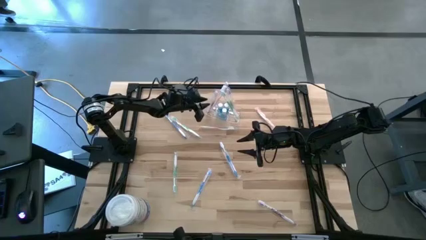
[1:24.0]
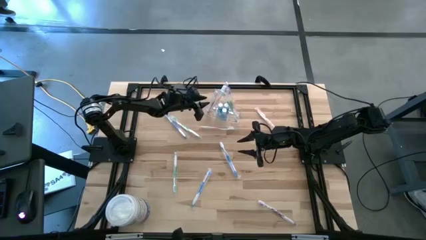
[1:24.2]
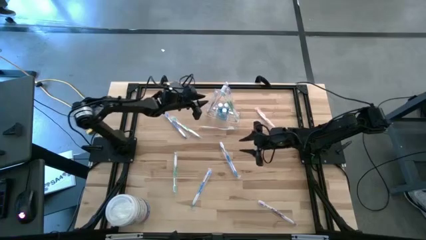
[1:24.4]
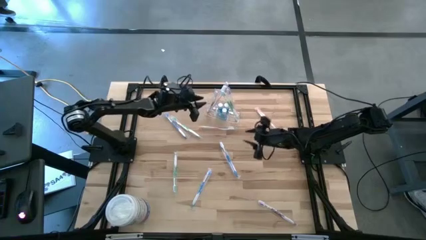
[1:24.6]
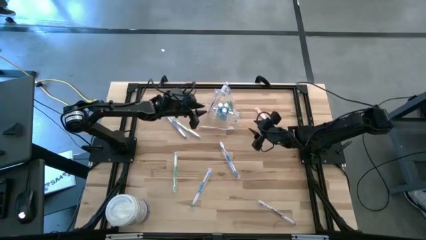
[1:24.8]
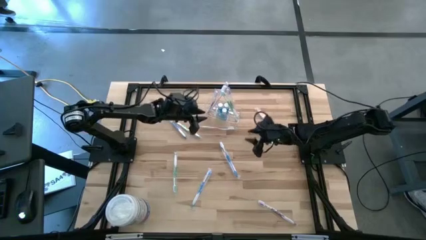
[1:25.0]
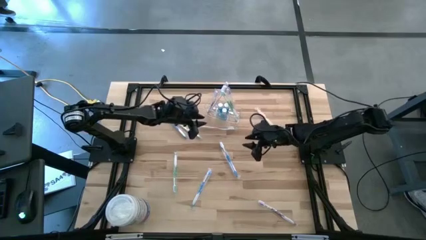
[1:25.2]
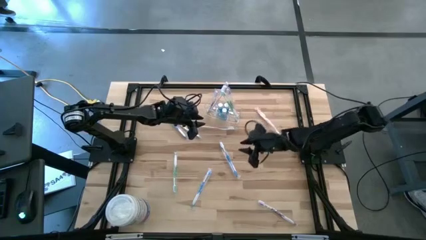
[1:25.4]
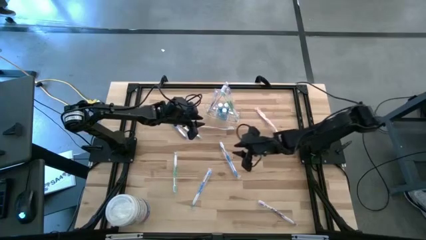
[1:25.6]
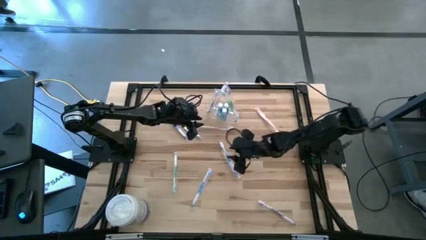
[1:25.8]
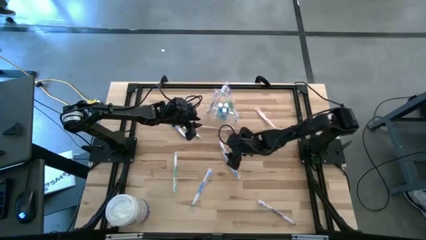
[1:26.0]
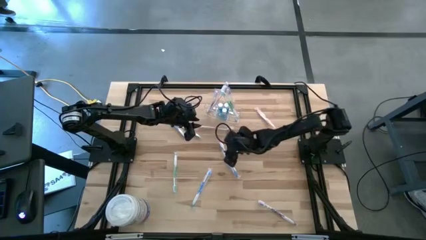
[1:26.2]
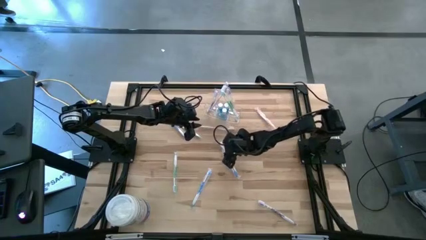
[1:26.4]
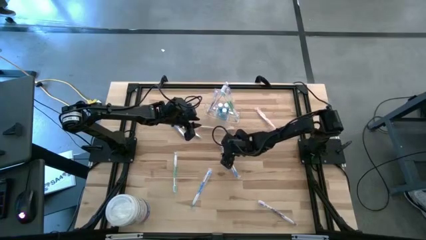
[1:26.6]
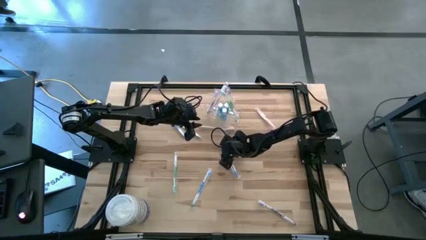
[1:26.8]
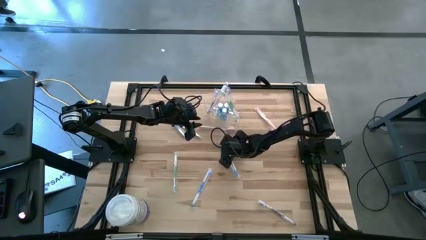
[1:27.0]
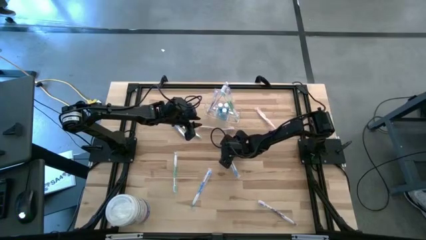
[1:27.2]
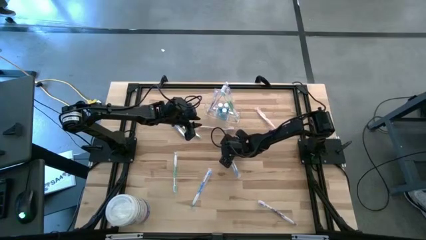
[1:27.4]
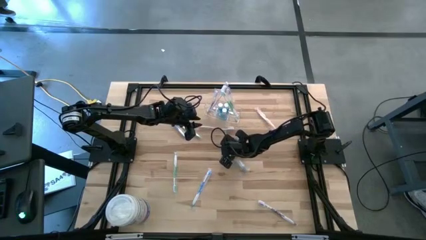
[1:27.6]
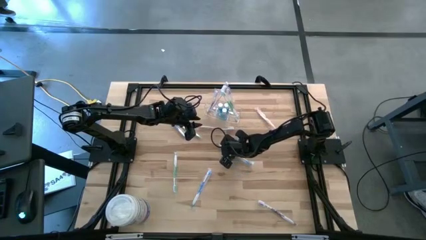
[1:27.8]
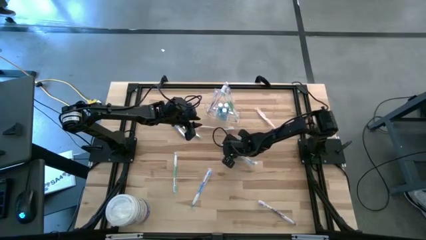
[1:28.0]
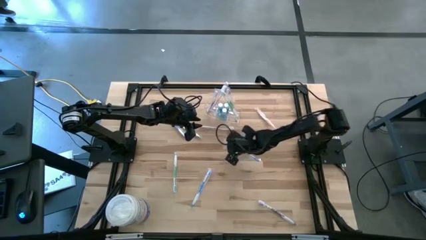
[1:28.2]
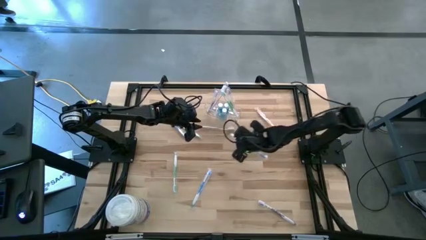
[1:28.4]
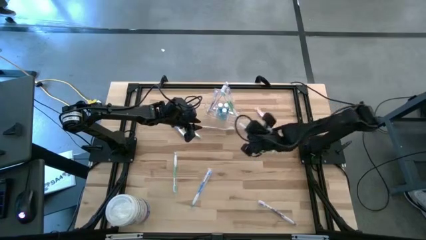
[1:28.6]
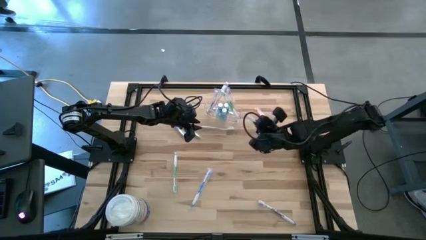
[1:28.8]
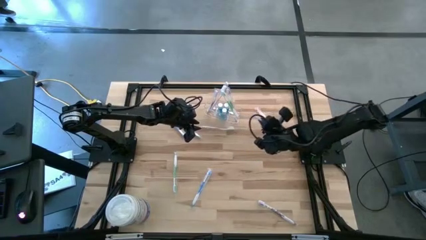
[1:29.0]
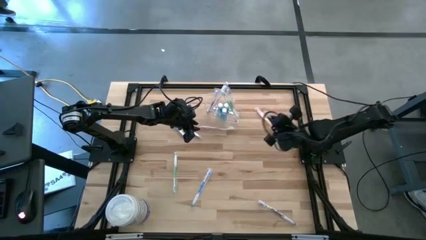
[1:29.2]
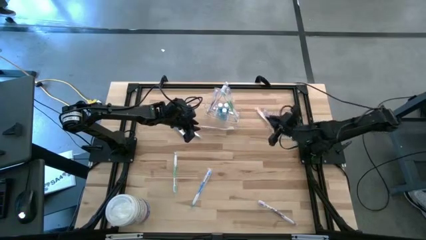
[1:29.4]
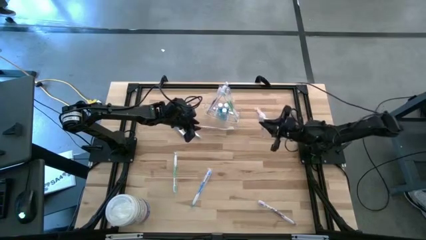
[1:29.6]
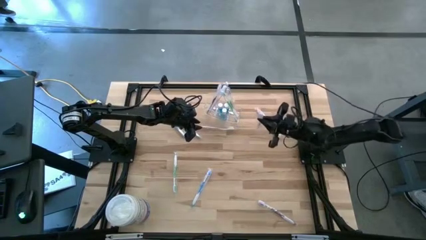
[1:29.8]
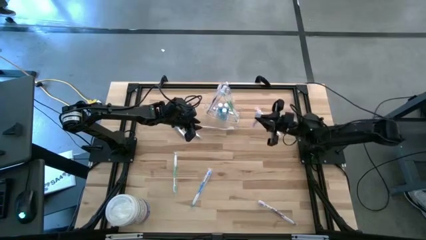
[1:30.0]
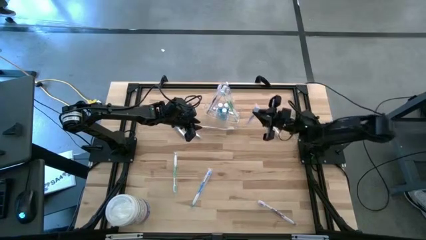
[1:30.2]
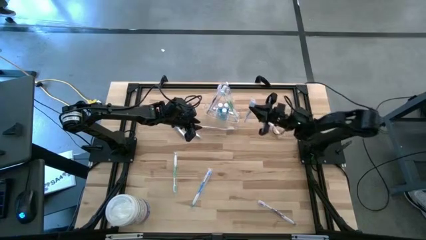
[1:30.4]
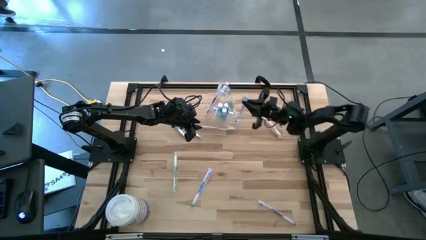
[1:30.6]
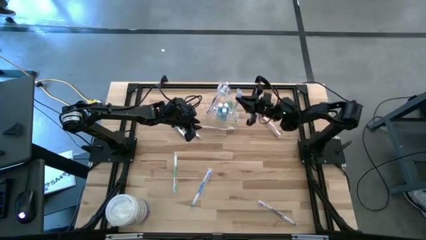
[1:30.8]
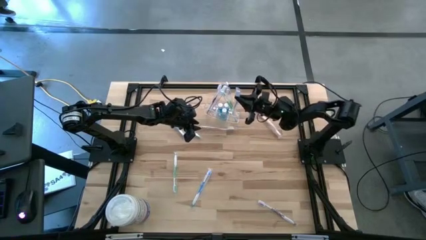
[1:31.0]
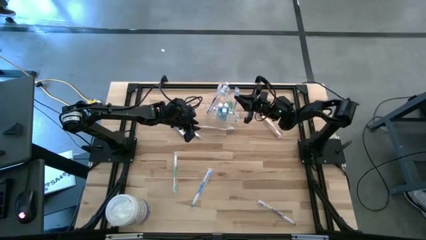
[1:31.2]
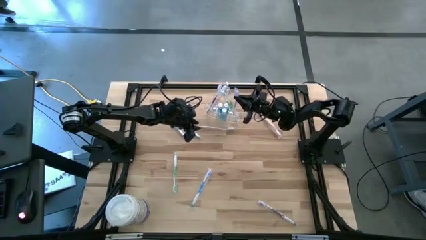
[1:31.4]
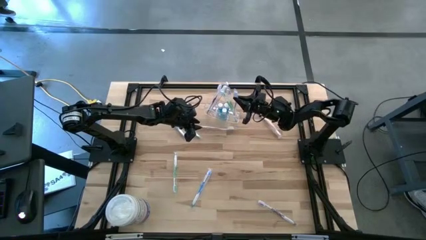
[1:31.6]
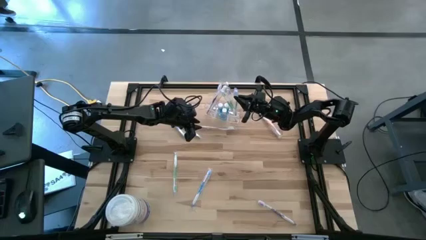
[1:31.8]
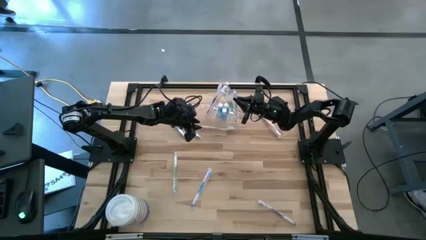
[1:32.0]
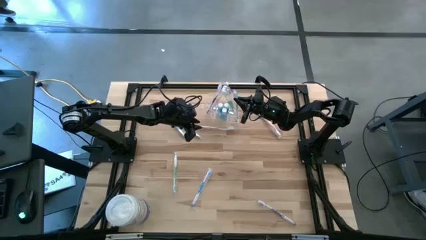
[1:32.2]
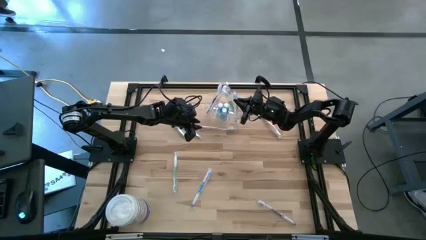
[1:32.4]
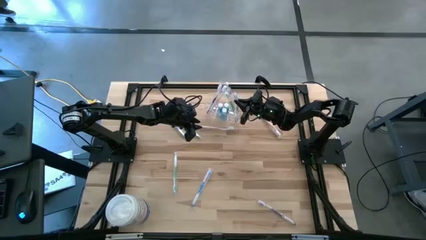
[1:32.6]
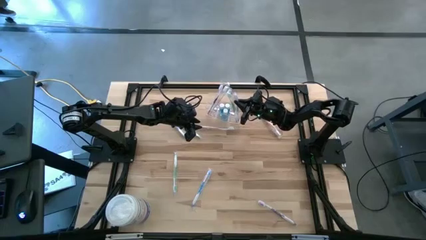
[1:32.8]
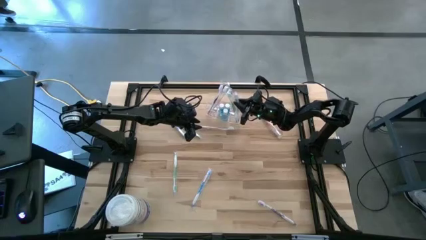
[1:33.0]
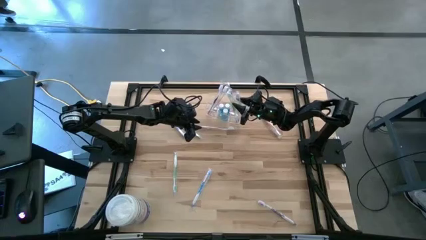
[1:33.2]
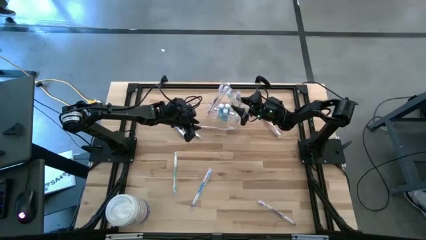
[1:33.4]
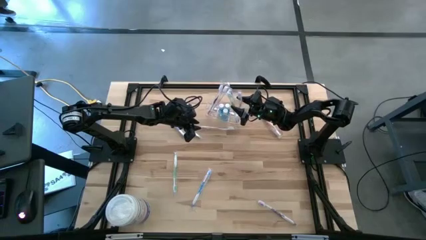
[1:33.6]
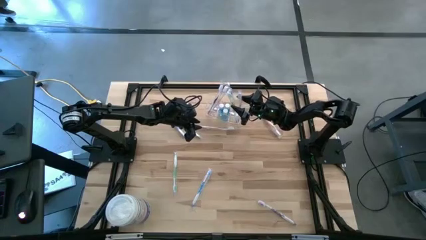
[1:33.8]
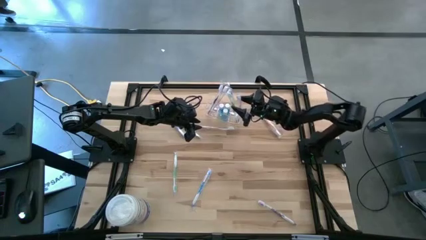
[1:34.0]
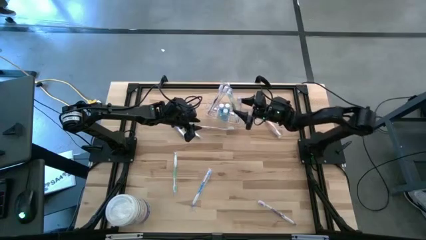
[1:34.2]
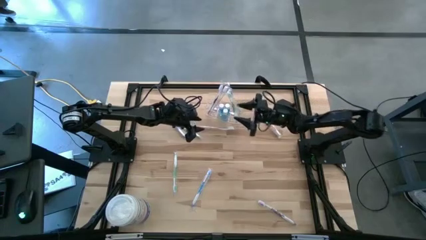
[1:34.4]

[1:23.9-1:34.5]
Task: Pick & Place toothbrushing station
Put the top blue toothbrush into the transparent organizer

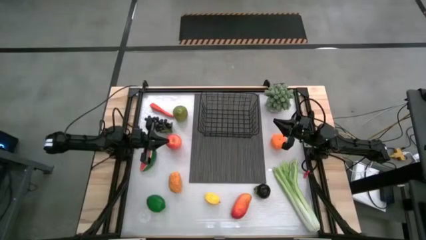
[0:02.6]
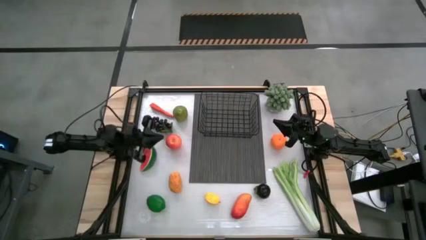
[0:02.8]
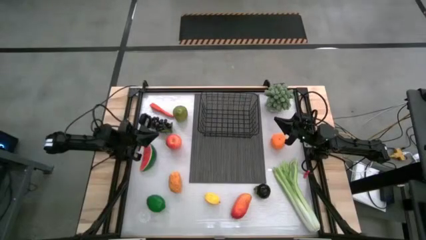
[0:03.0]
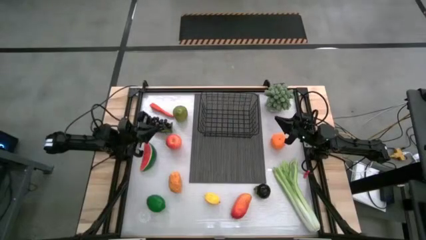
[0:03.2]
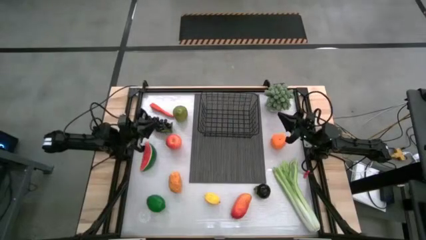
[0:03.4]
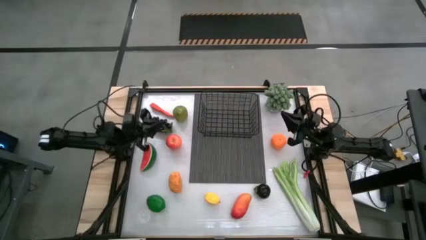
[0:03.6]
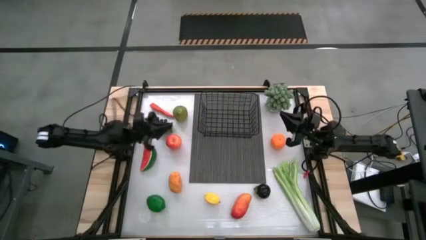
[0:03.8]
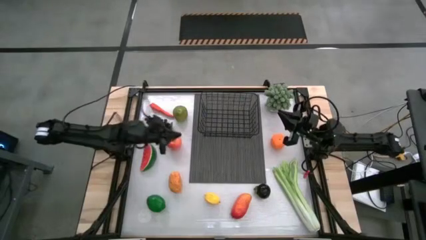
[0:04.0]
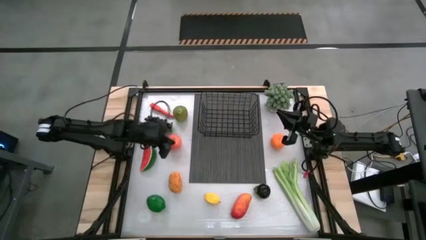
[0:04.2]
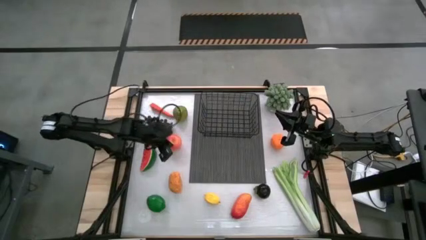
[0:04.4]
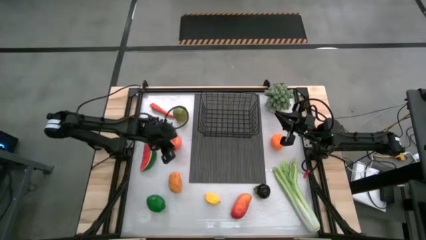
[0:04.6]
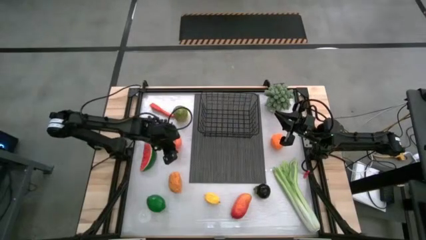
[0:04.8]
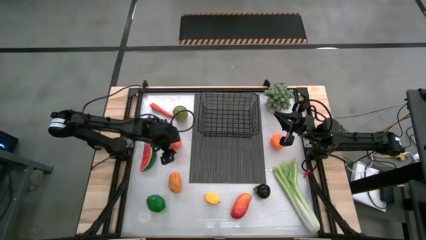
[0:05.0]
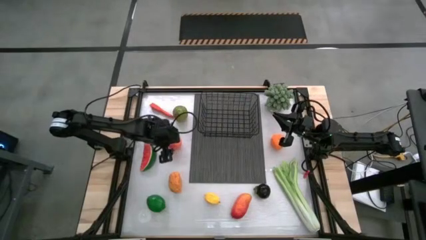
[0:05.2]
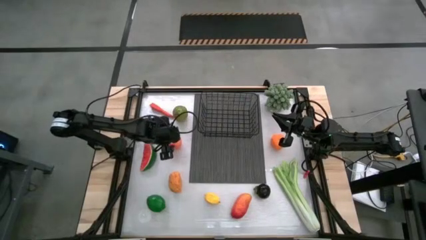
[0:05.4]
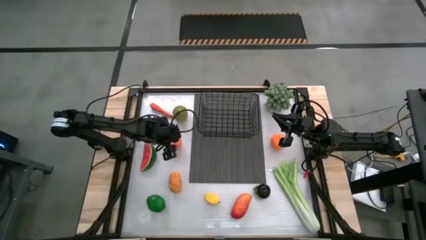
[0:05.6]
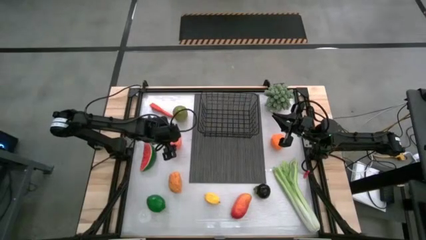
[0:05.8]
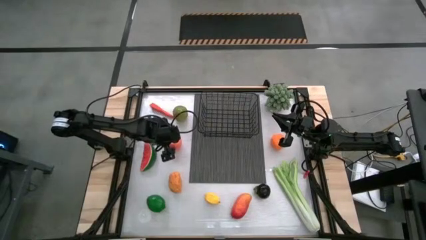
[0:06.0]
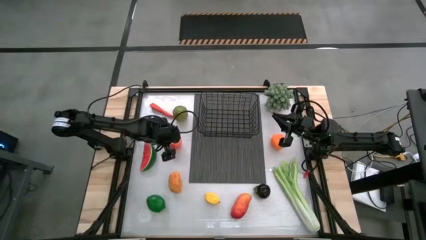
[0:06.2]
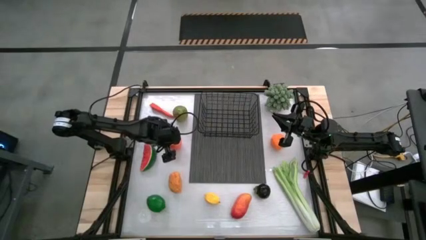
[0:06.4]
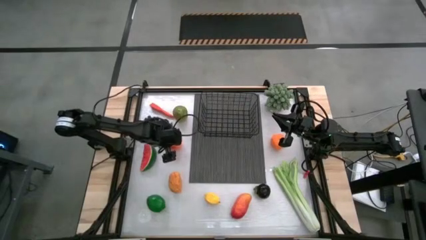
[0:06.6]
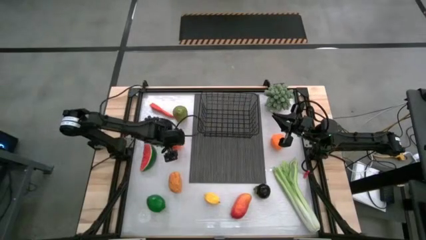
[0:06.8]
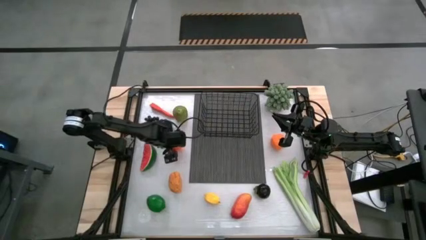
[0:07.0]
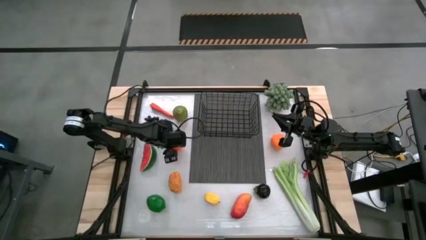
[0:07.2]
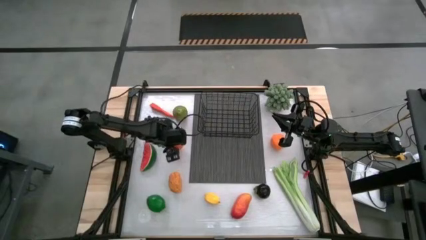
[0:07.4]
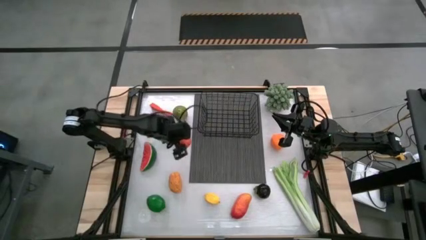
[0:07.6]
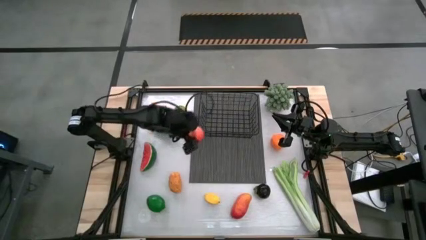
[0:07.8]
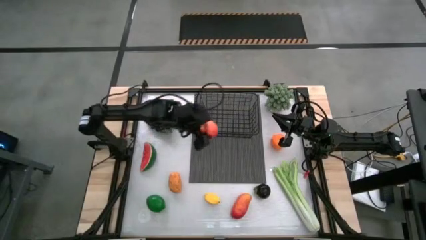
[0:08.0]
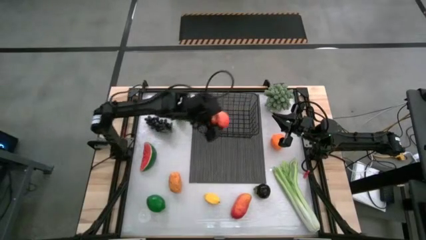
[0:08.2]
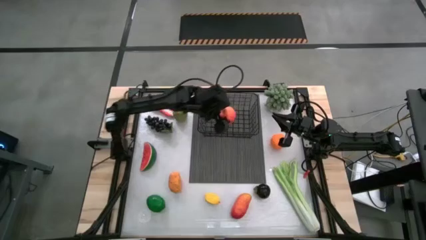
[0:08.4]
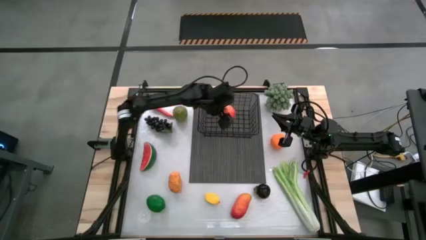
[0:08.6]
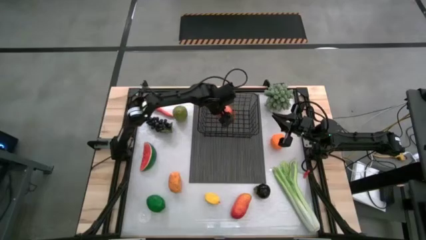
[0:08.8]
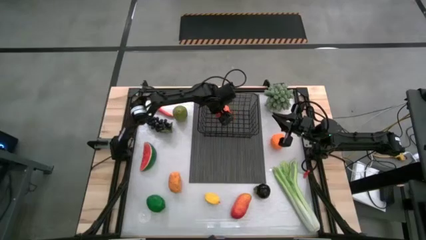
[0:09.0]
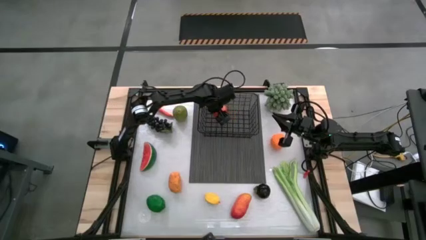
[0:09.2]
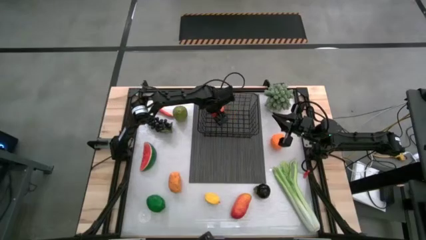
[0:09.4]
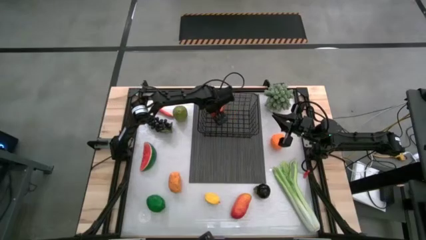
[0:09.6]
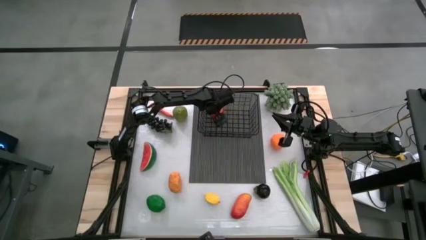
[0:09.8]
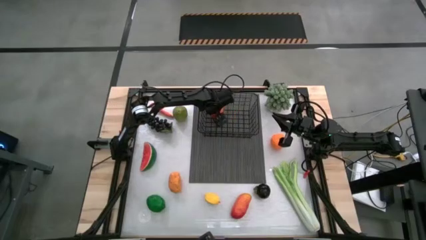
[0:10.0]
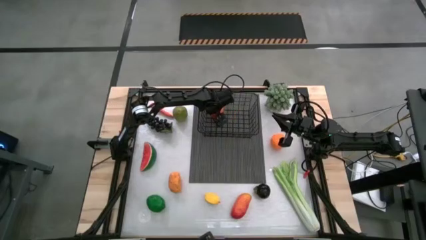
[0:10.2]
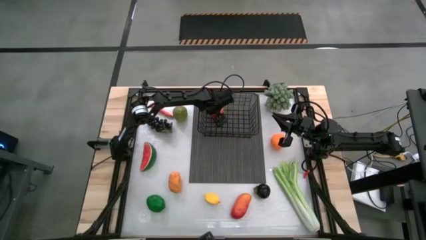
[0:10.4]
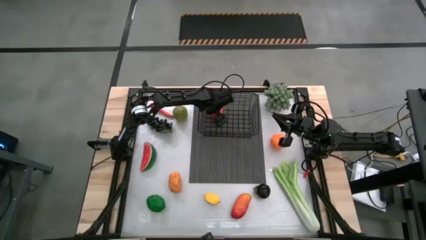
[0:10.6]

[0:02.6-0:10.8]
Task: Build produce basket
Put the apple into the wire basket
